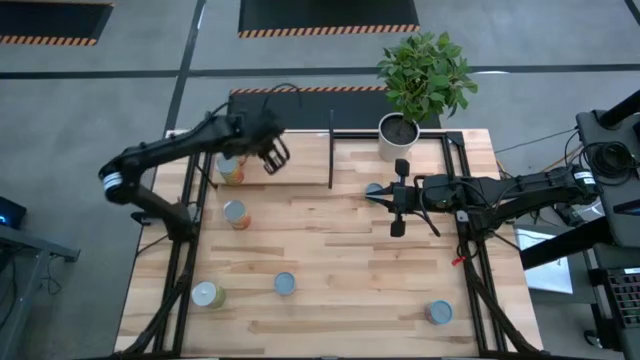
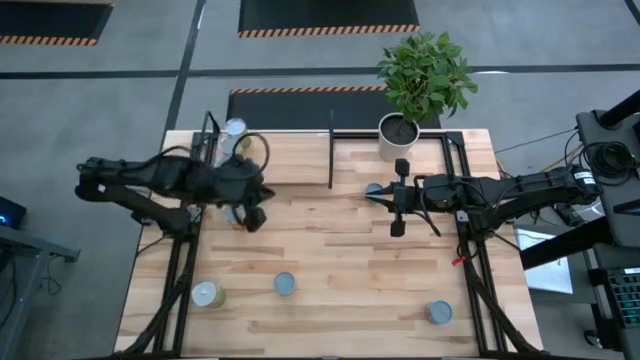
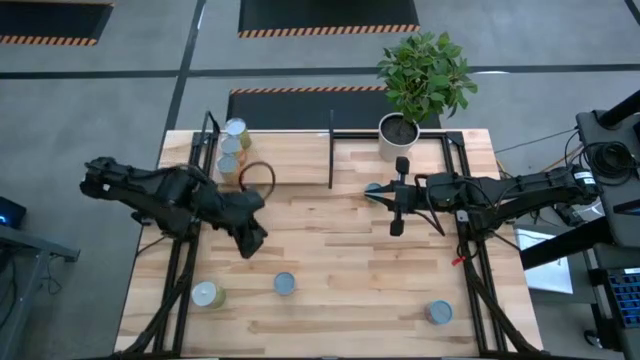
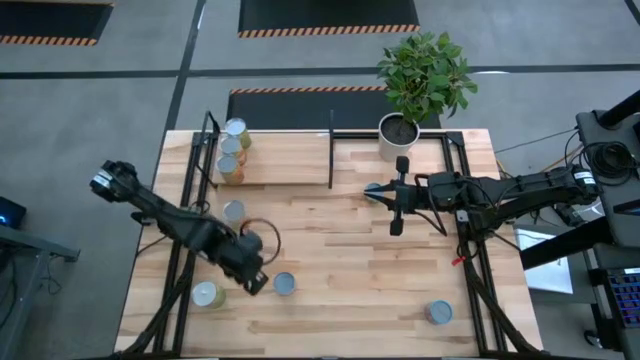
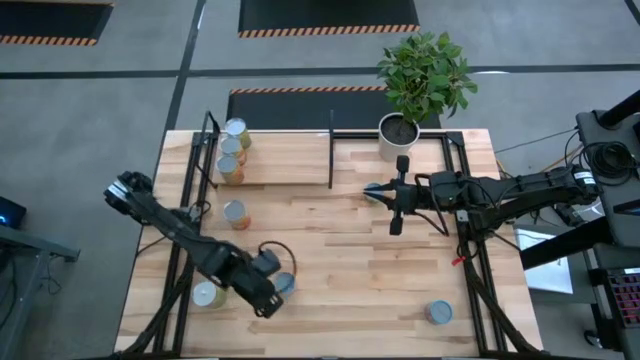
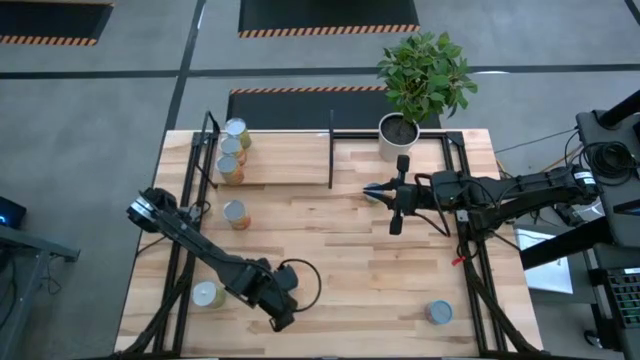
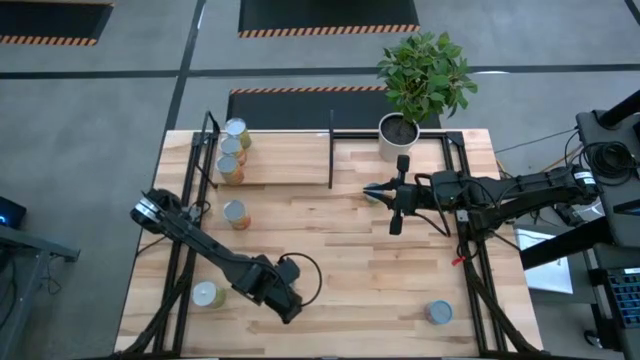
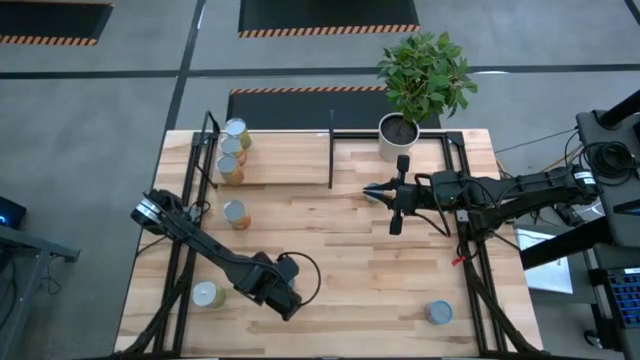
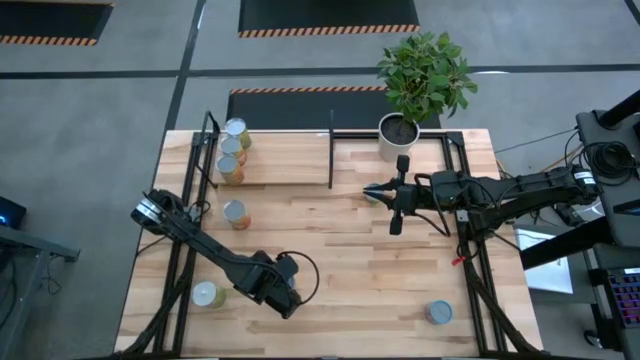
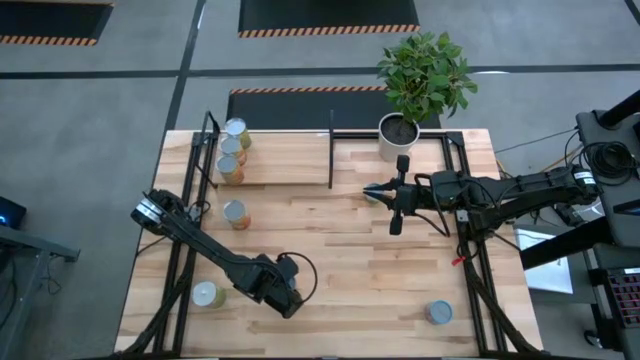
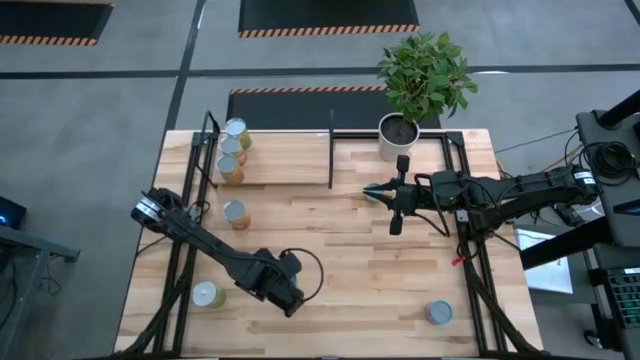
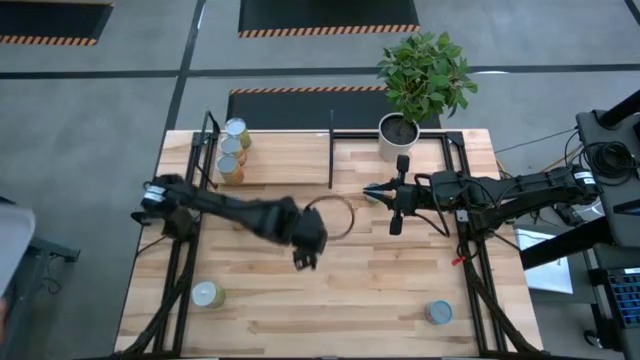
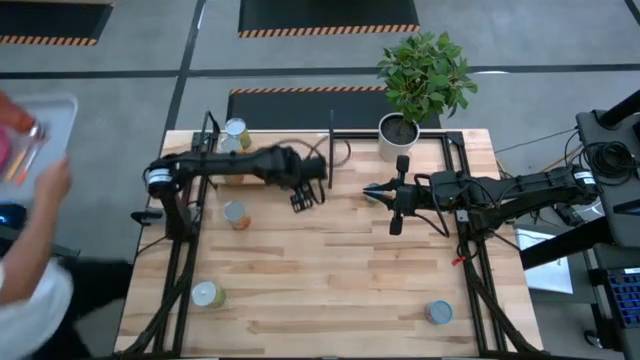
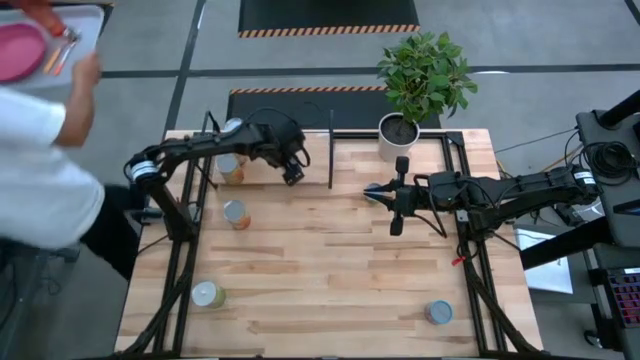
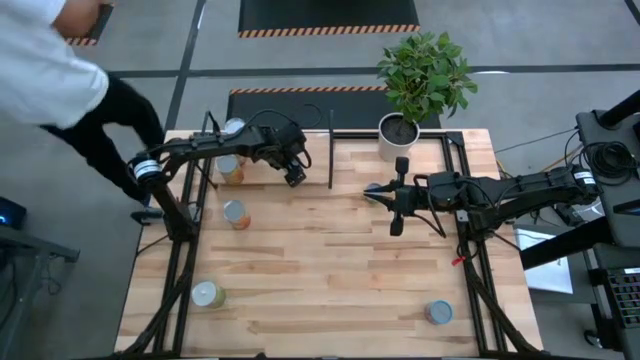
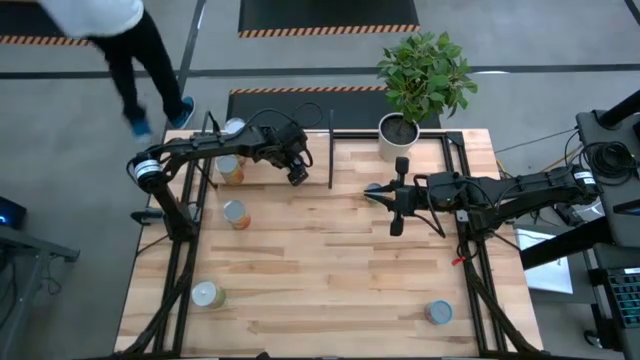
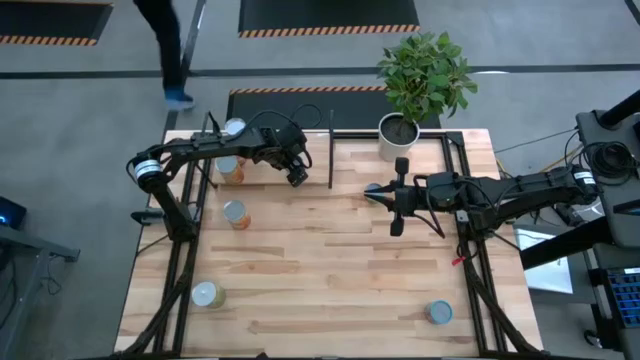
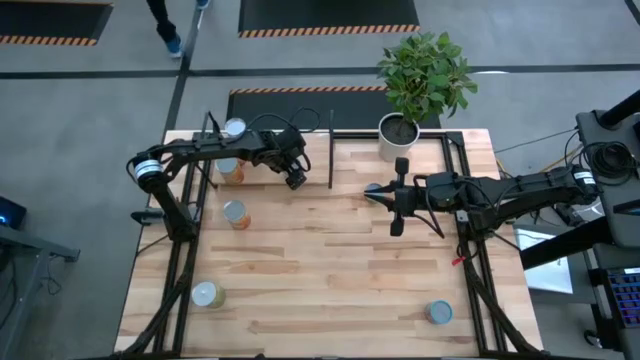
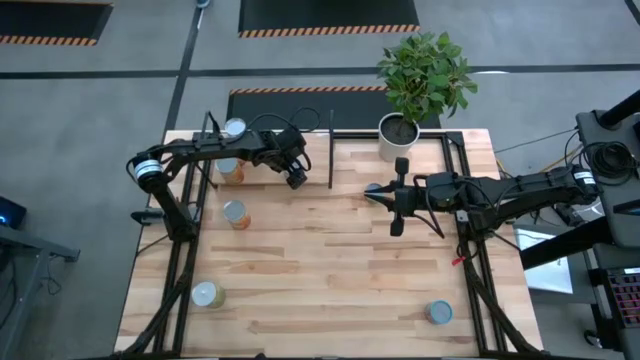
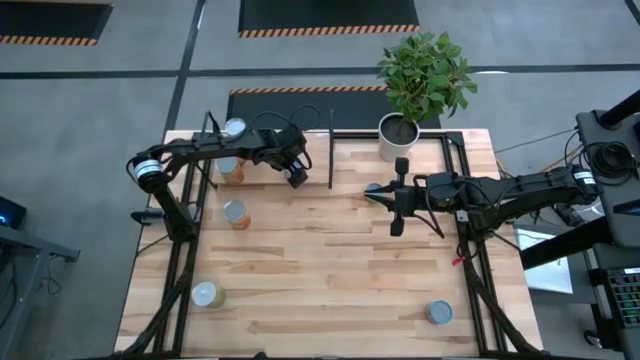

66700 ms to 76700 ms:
Task: Pick and place cans onto a shelf
Put the yellow spicy beans can on the shelf

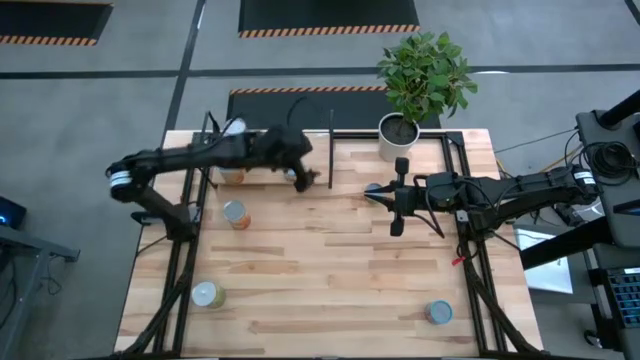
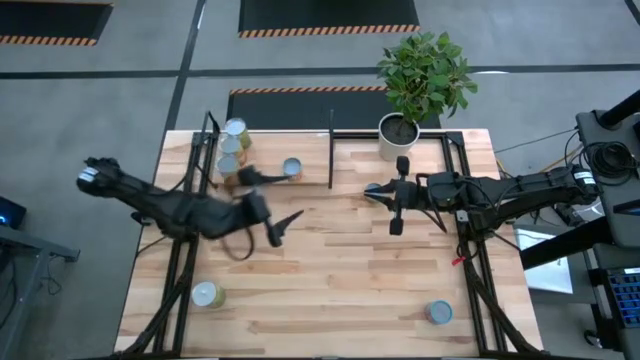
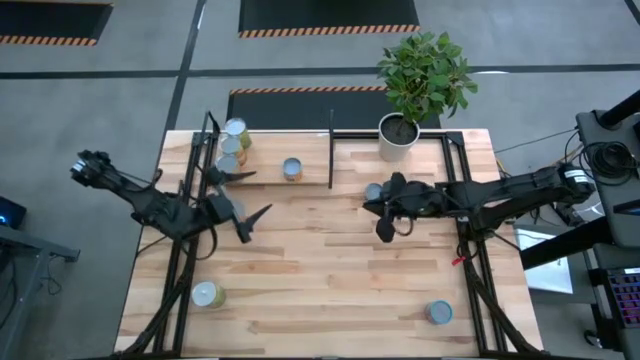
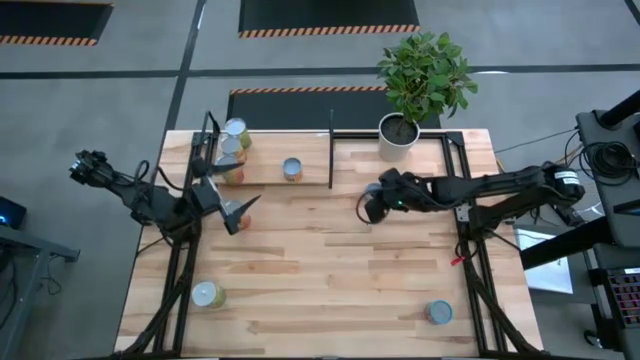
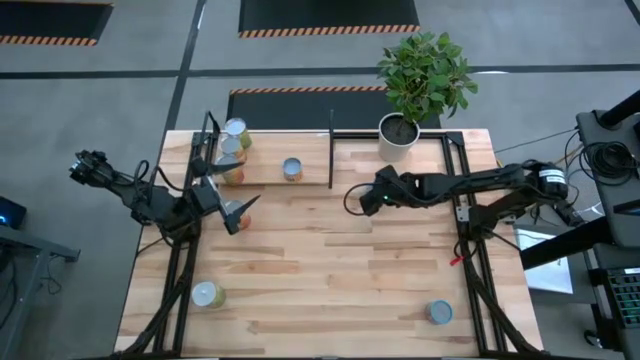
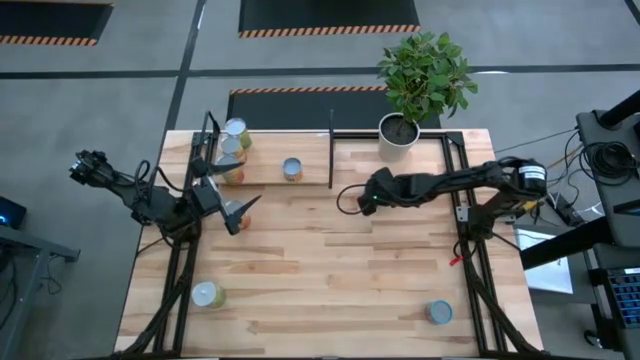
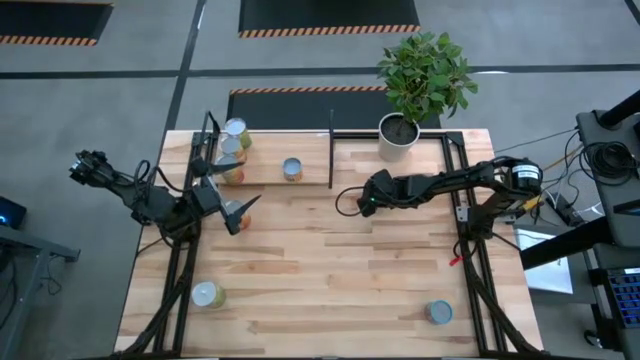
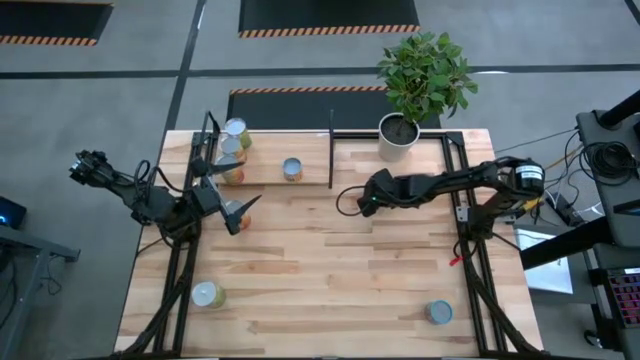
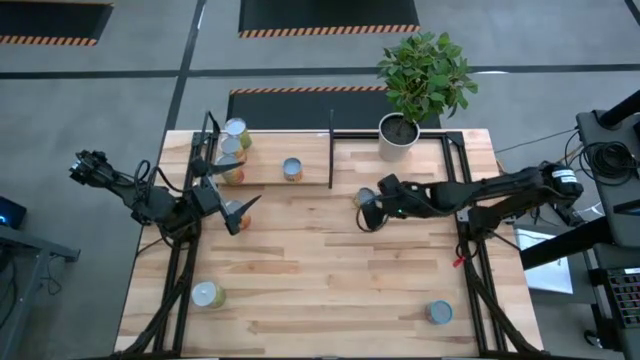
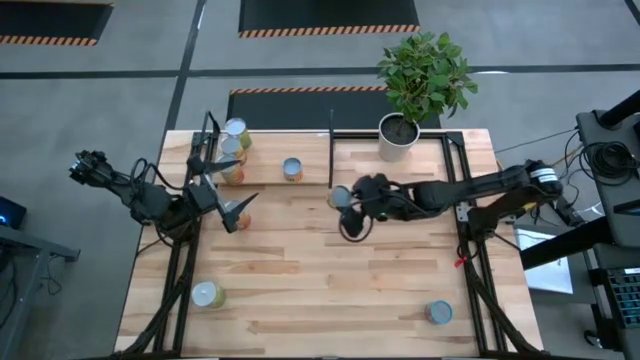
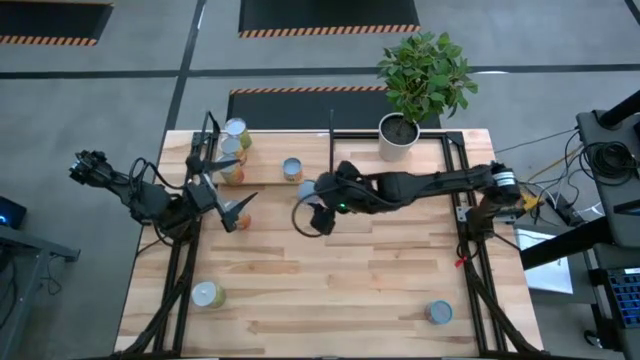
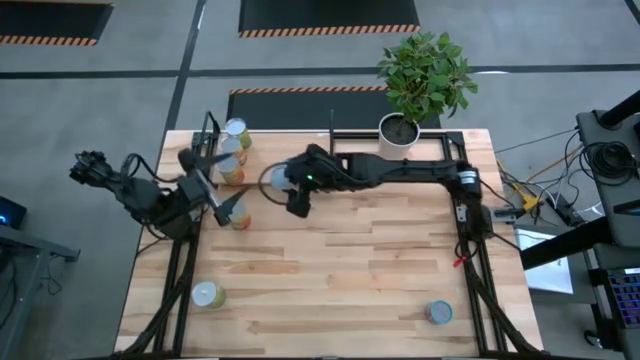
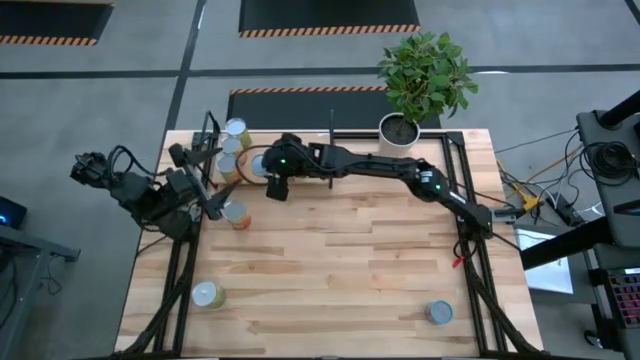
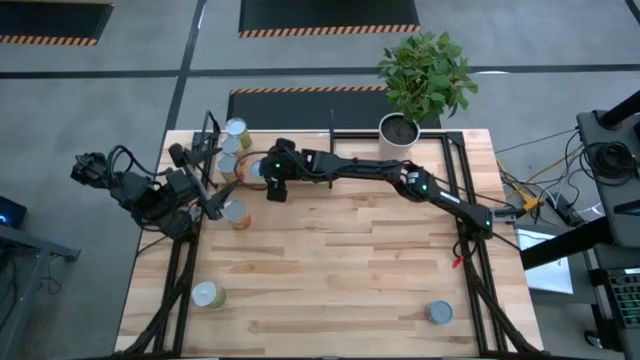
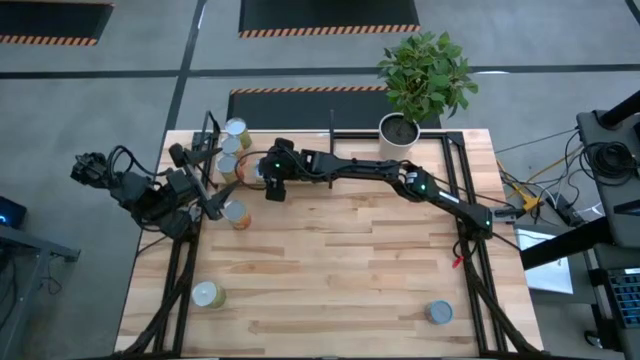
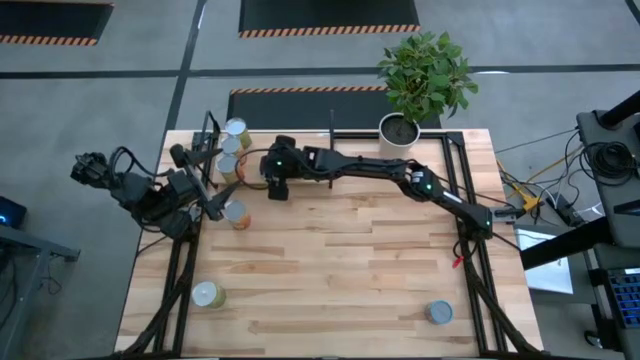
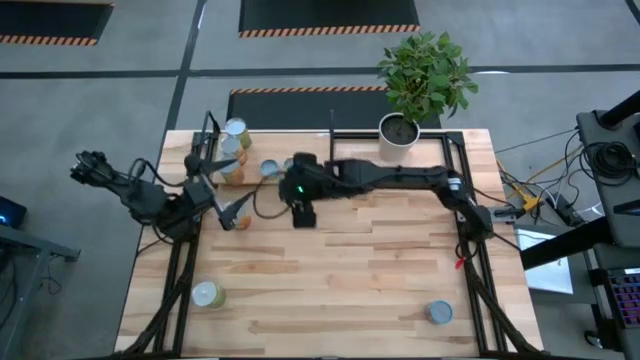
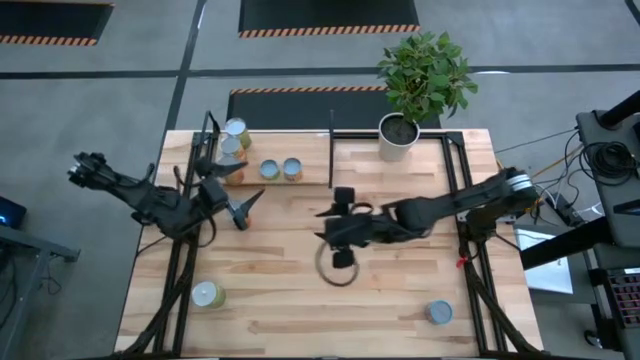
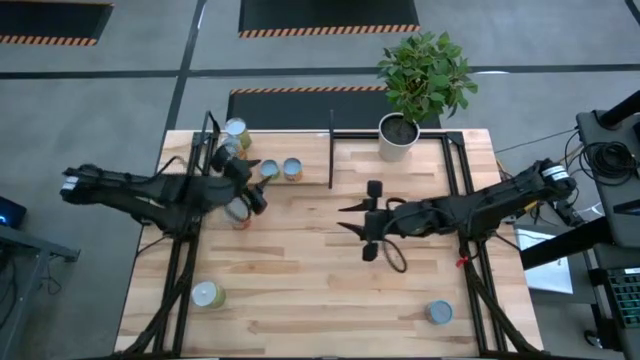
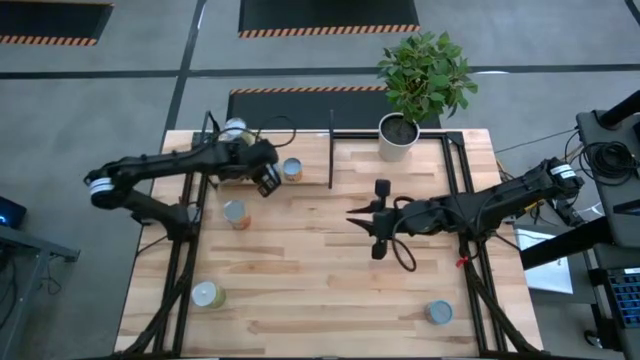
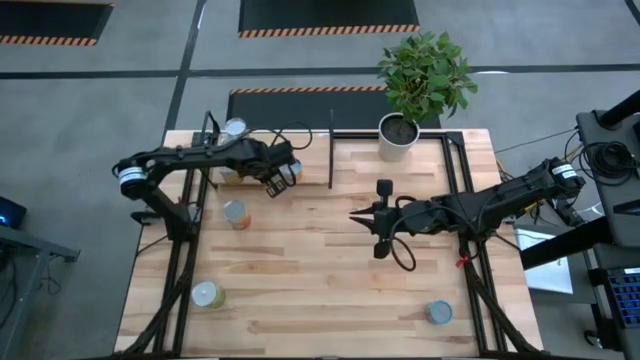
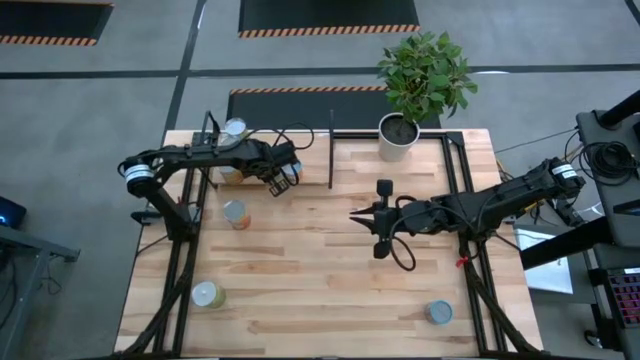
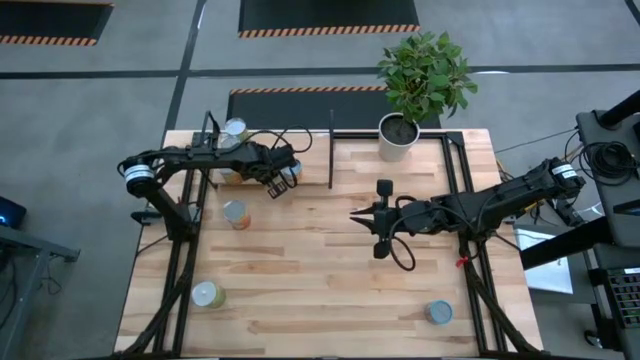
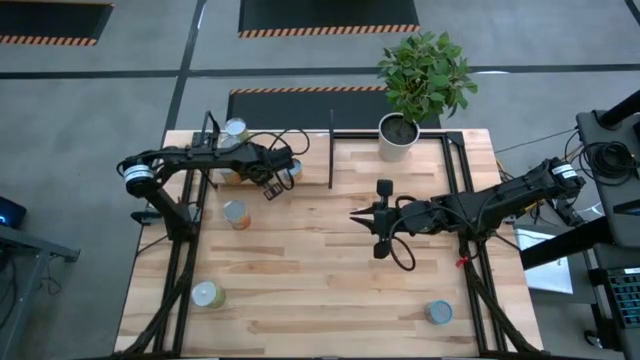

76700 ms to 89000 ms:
Put the small green corn can on the shelf

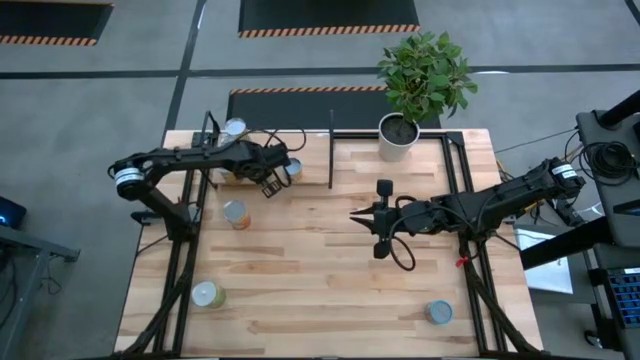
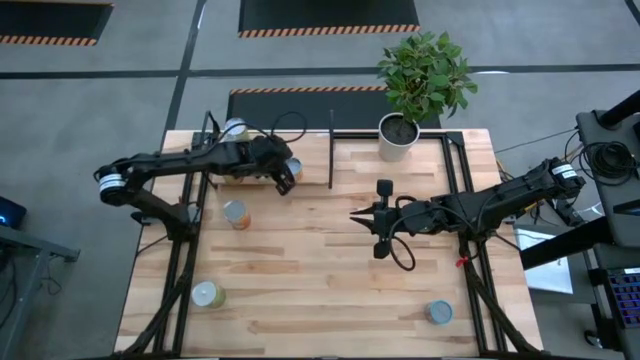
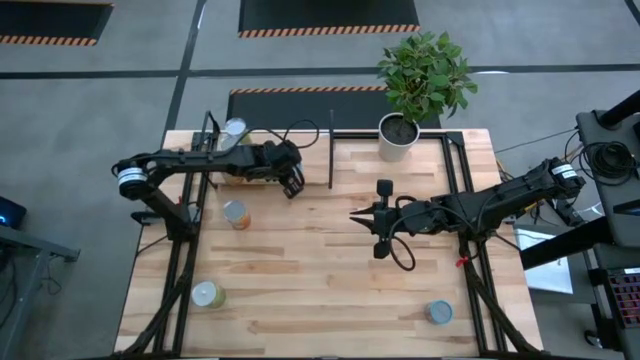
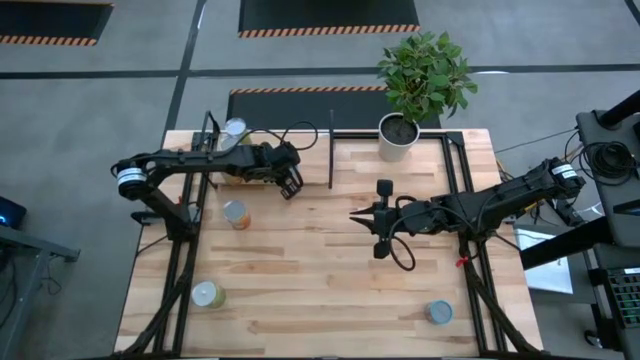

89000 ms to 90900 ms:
Adjust the yellow spicy beans can on the shelf
